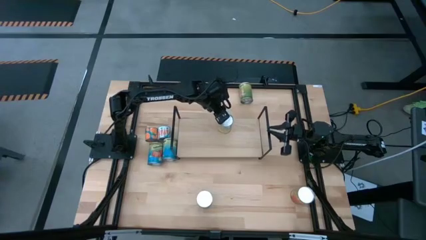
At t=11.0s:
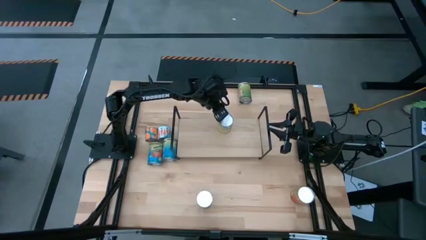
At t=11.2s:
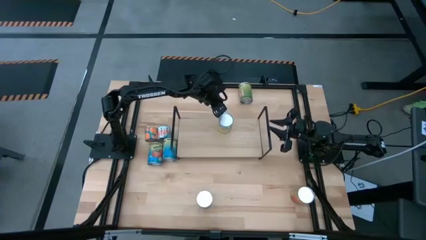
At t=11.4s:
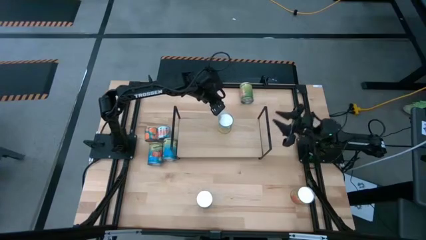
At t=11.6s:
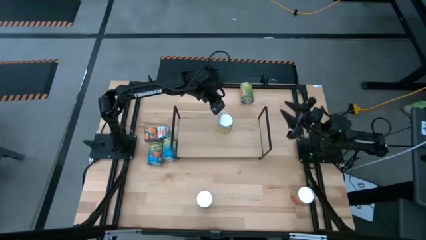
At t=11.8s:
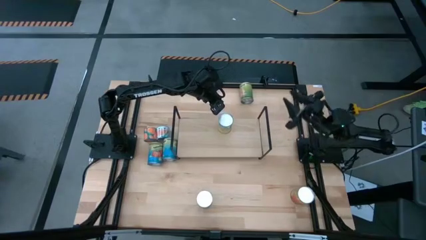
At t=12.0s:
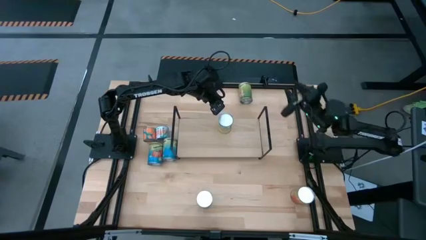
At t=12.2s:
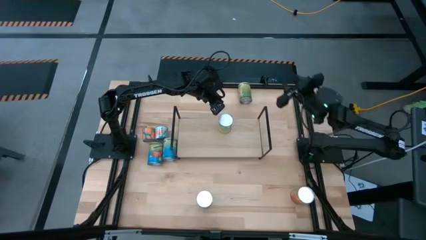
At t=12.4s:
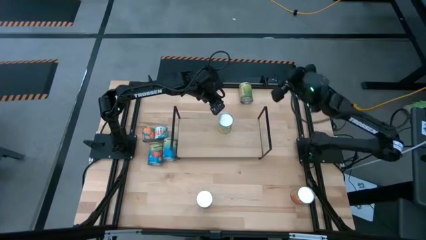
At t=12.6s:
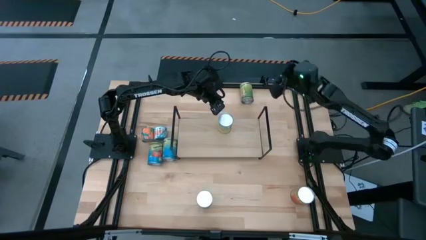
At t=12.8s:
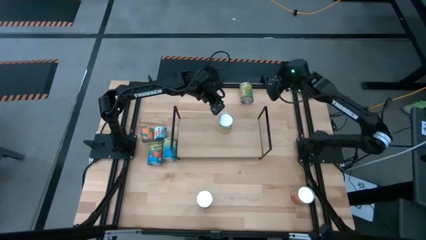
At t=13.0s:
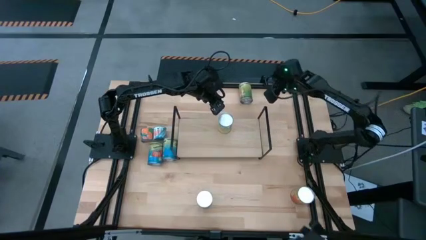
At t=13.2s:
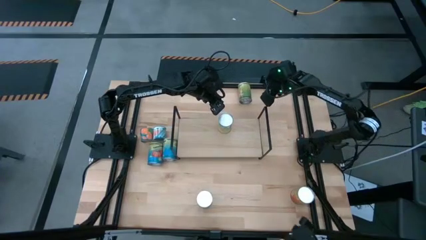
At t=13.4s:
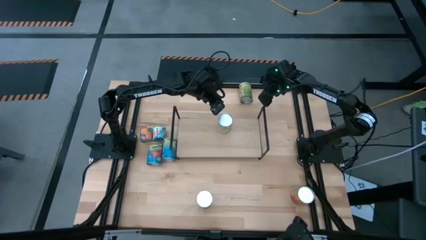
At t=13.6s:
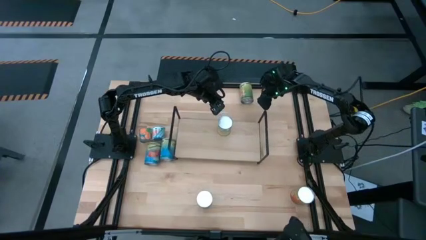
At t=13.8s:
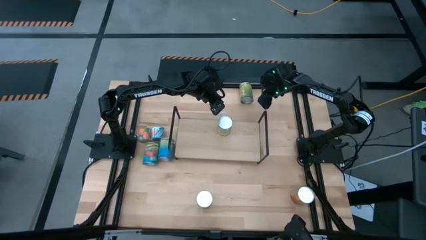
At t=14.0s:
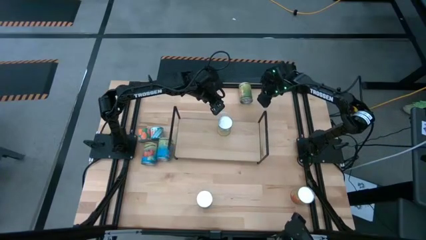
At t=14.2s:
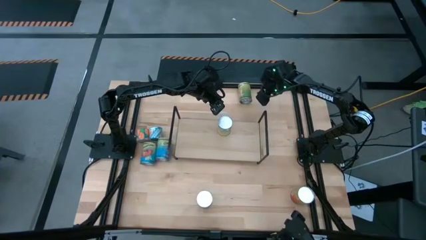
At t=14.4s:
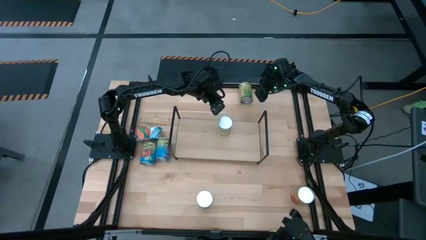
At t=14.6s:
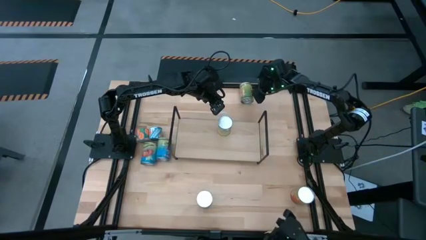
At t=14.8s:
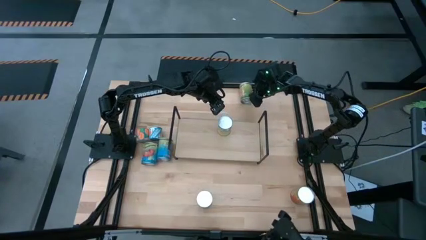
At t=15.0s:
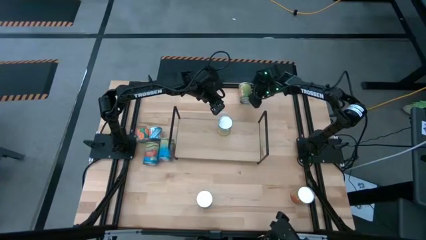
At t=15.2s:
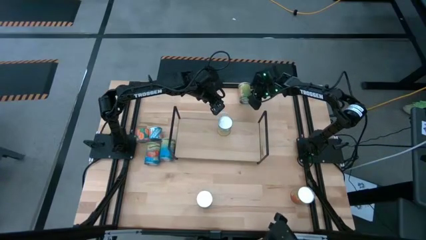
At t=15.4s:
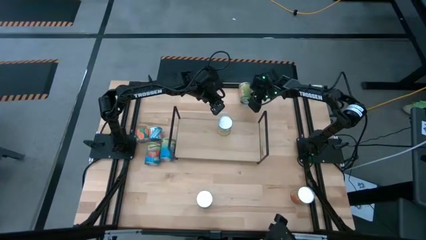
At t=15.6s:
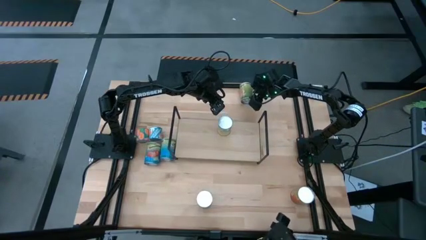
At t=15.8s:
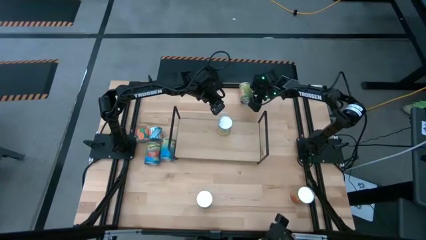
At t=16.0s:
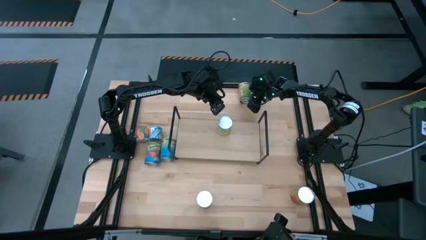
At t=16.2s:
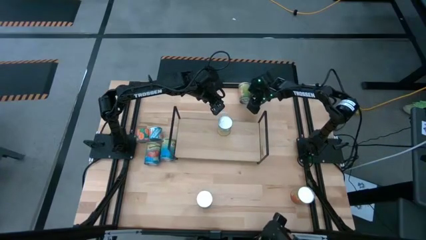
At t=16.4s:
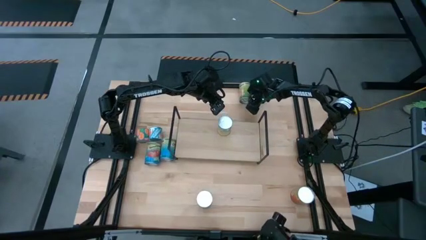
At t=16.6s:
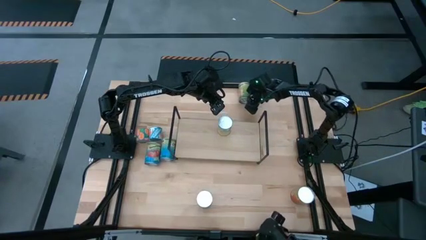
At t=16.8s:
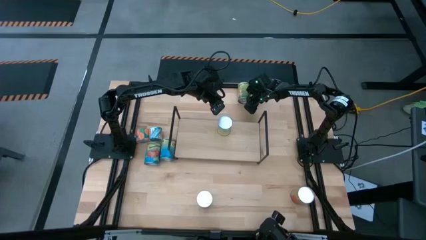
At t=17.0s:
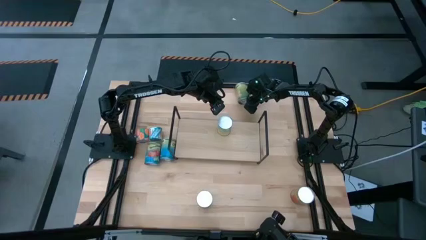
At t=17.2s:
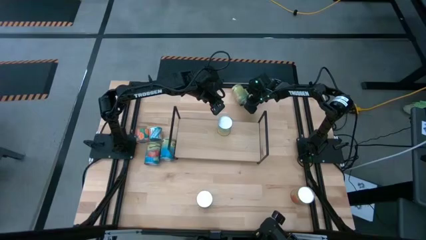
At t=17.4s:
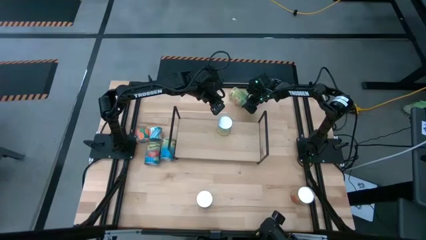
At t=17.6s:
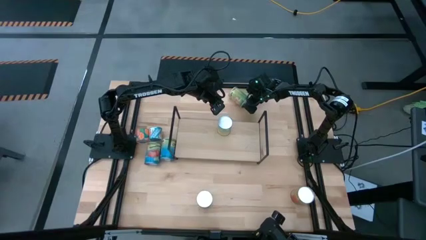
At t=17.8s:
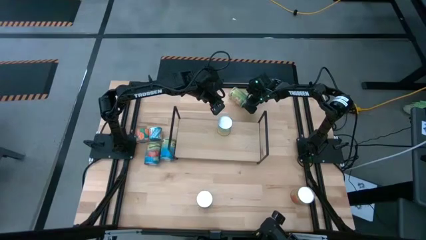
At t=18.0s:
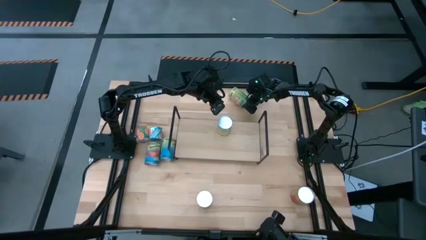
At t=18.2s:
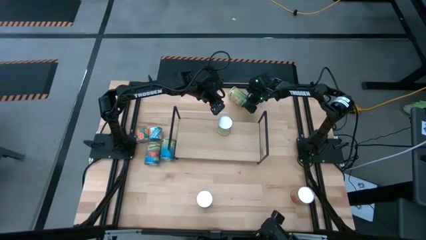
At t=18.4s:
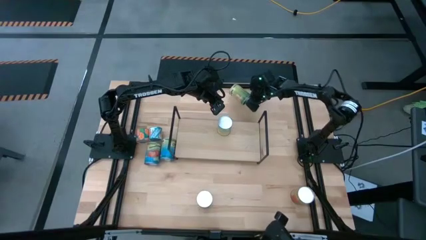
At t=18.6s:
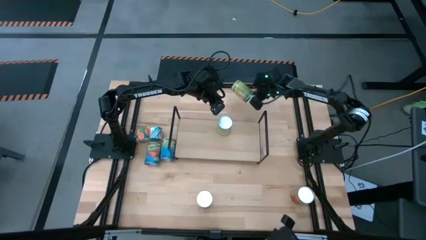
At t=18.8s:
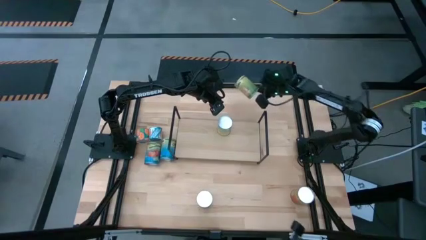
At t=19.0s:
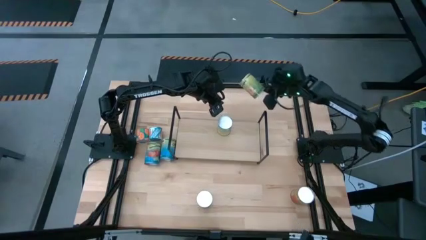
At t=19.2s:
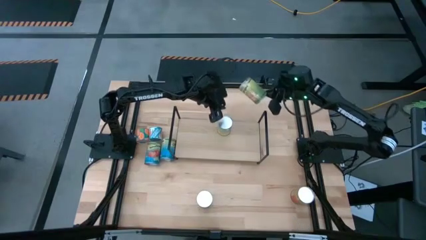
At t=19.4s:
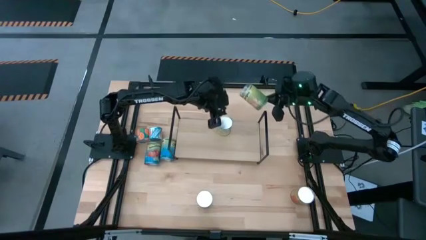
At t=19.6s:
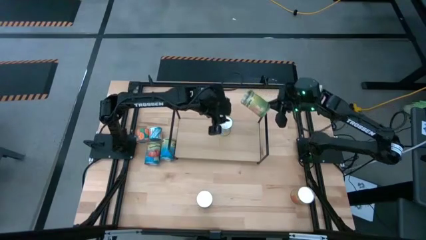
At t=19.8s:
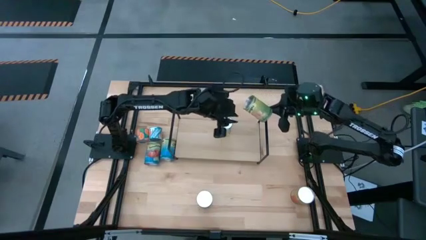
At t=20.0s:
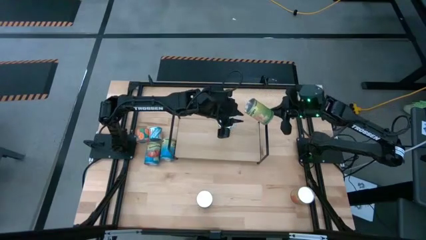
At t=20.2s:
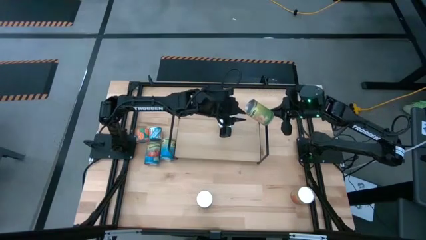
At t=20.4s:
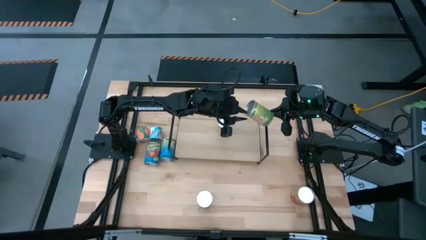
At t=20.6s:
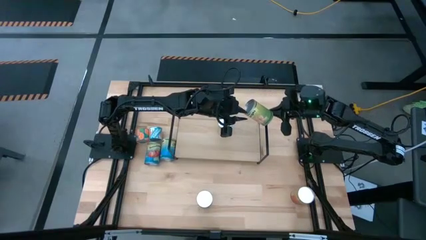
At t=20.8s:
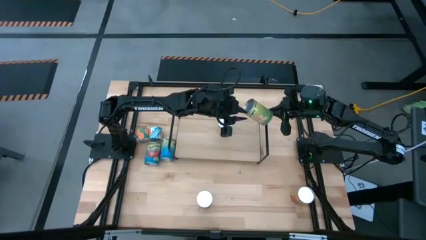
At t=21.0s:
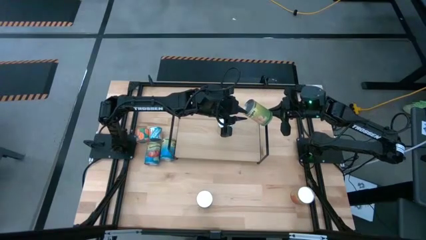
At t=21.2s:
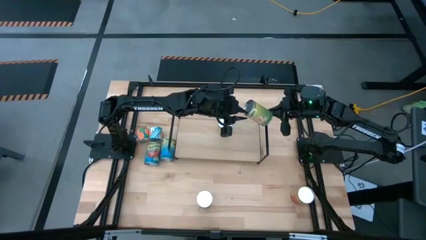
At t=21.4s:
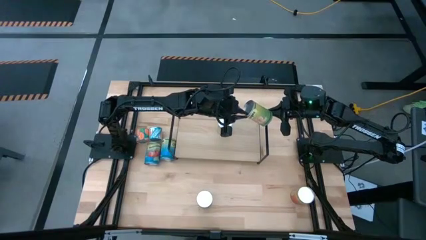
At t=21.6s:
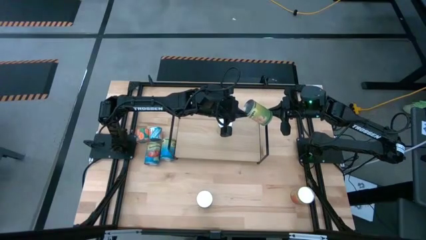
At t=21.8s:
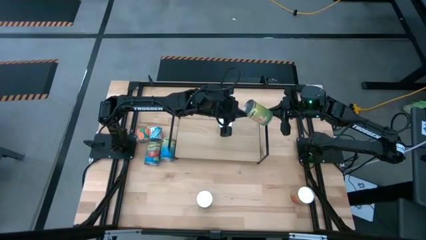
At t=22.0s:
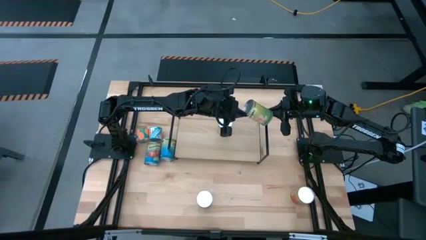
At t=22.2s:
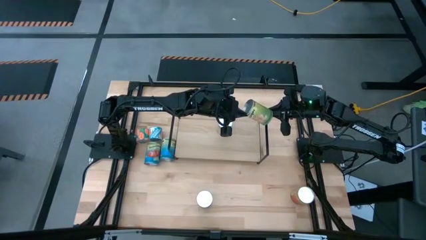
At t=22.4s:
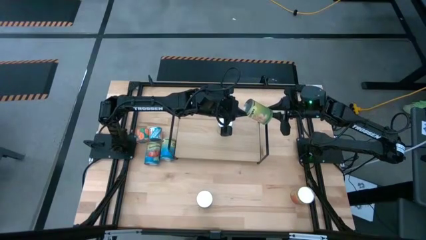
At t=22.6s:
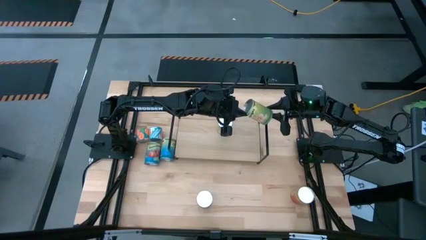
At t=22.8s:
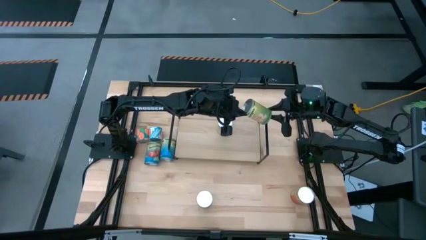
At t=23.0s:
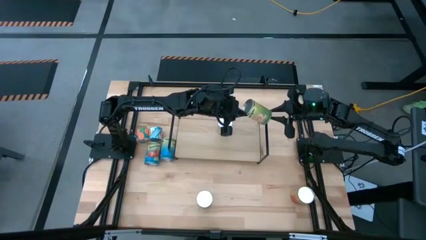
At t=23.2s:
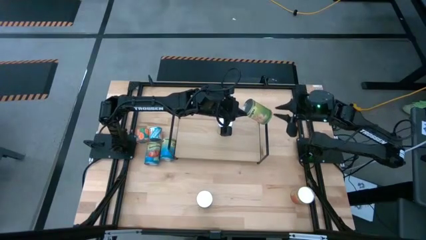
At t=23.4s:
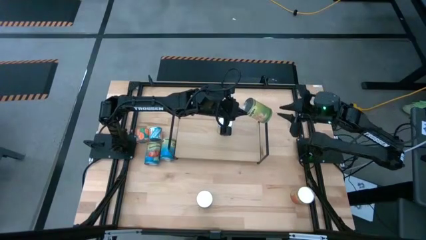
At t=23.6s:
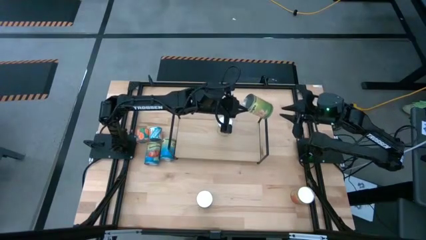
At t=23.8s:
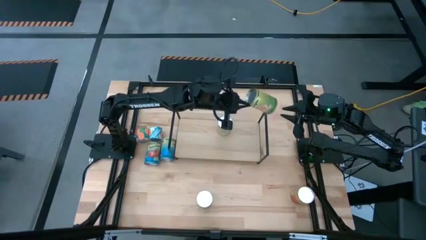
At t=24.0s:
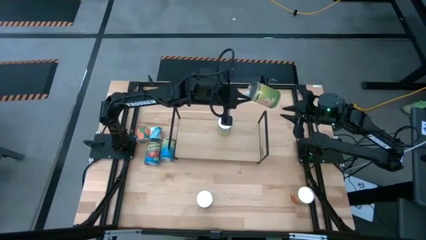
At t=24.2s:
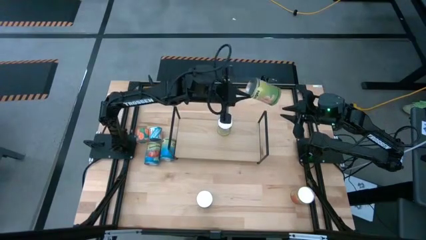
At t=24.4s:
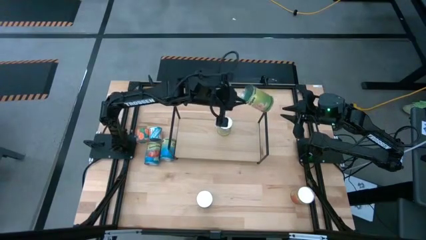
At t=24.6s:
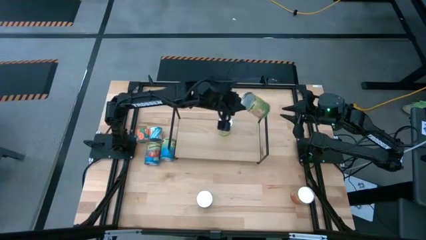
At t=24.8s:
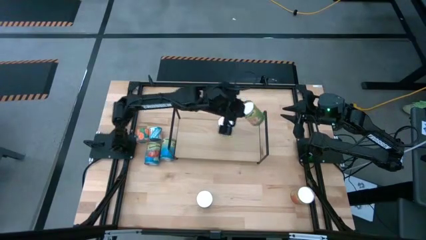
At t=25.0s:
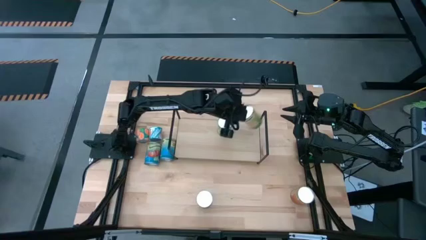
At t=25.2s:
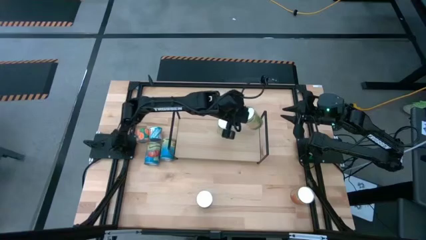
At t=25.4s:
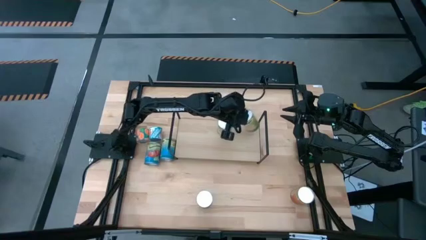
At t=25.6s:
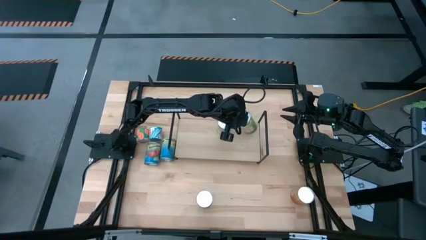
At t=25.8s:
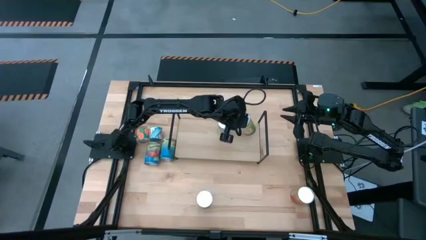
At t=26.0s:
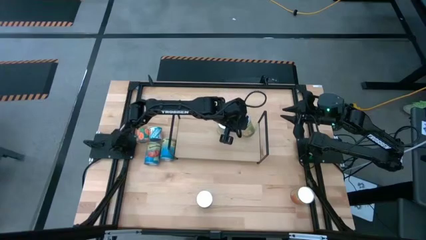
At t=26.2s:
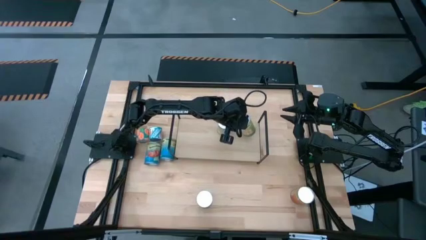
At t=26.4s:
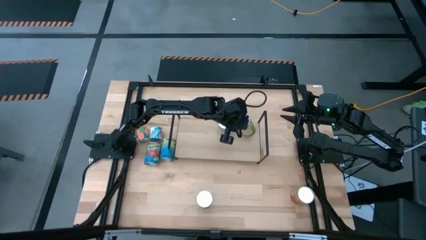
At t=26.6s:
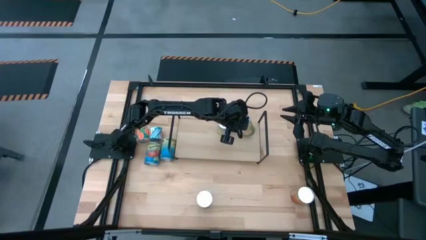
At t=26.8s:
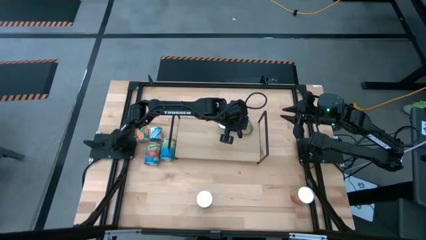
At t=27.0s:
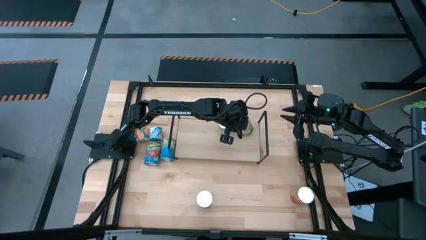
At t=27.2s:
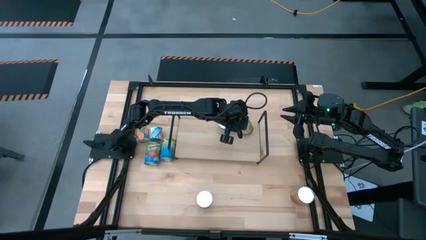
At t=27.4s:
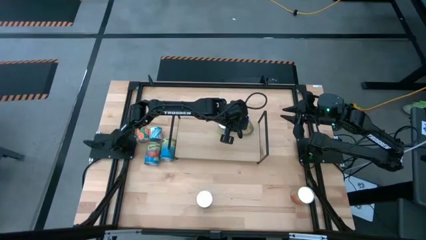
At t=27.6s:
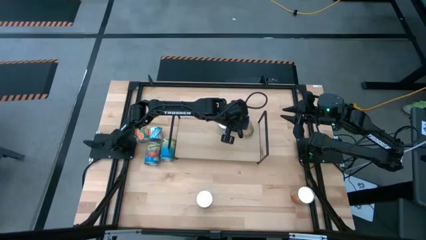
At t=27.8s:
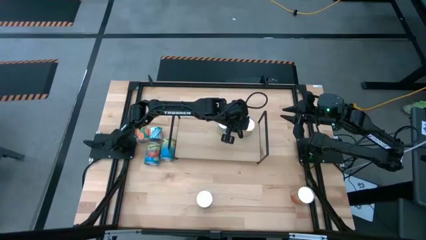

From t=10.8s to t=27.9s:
Task: Pick and place cans onto a shelf
Put the canned oranges on the shelf
